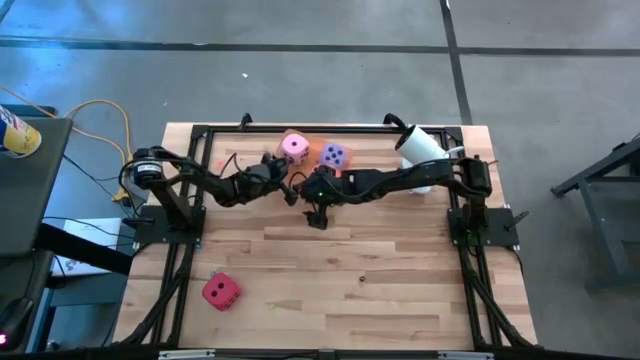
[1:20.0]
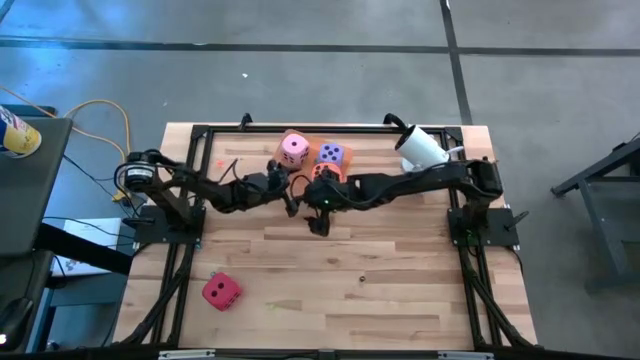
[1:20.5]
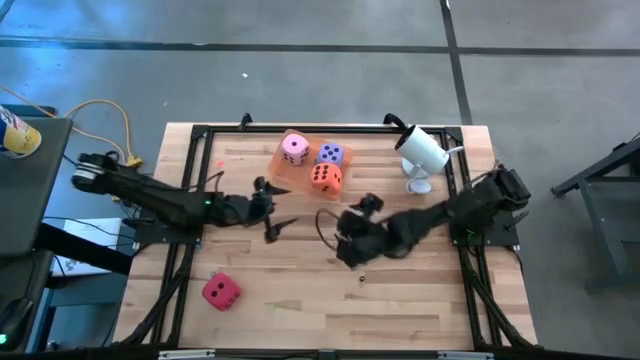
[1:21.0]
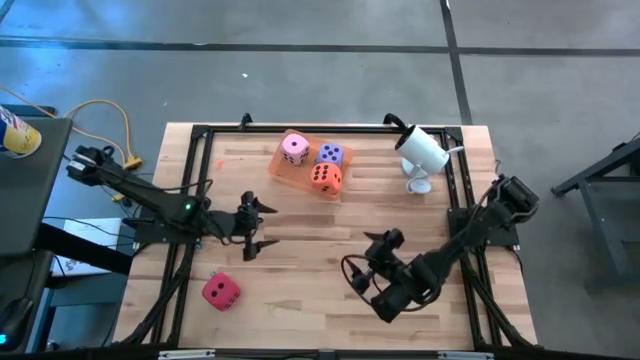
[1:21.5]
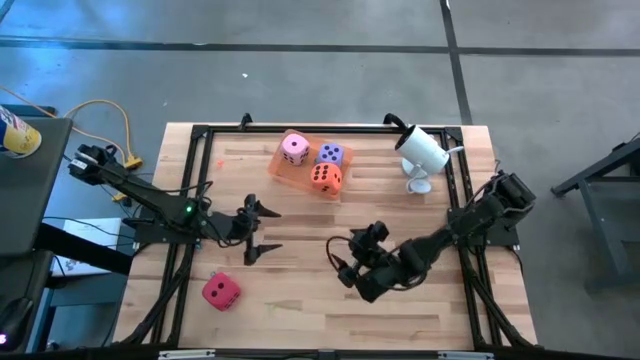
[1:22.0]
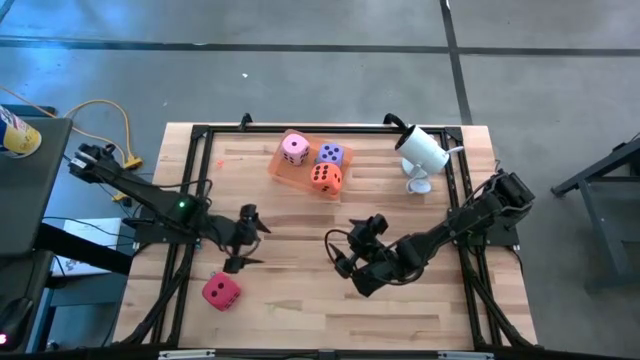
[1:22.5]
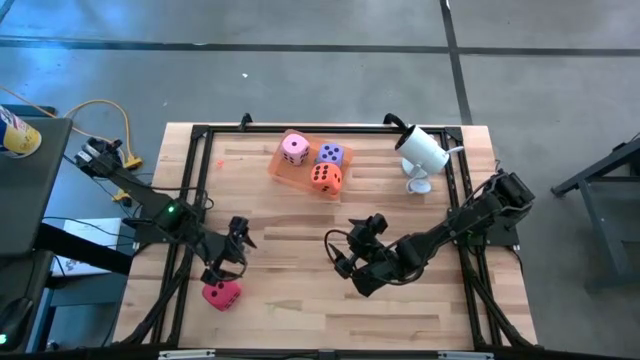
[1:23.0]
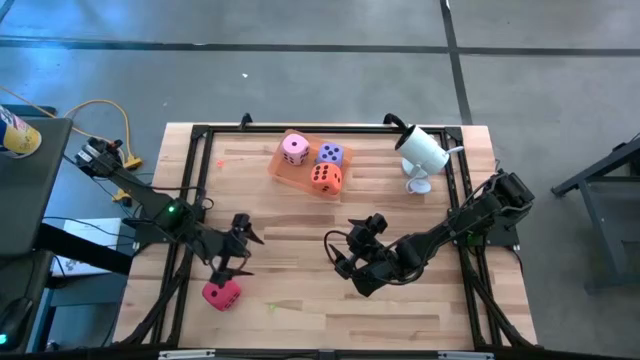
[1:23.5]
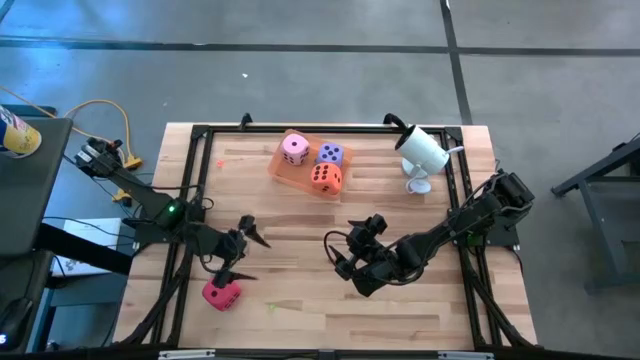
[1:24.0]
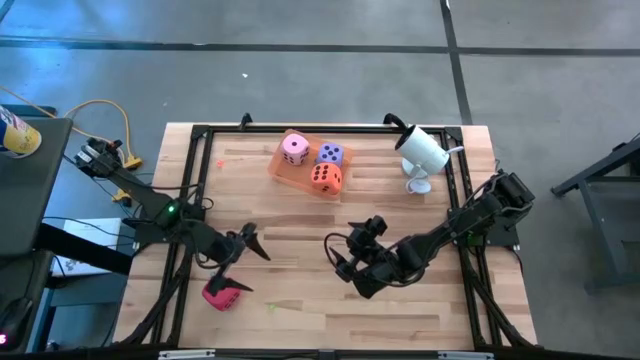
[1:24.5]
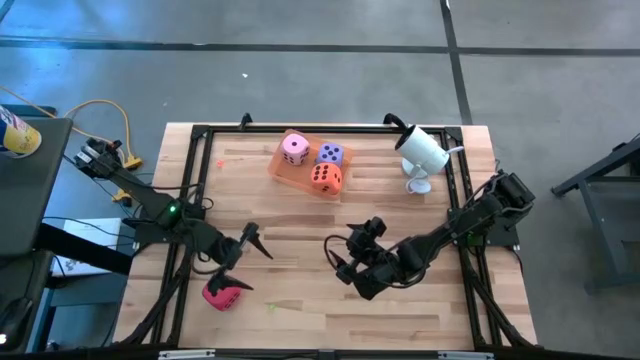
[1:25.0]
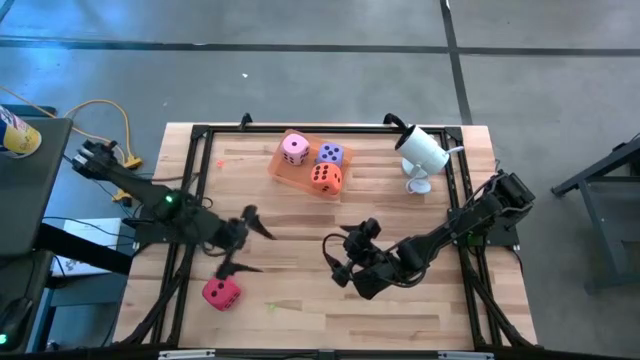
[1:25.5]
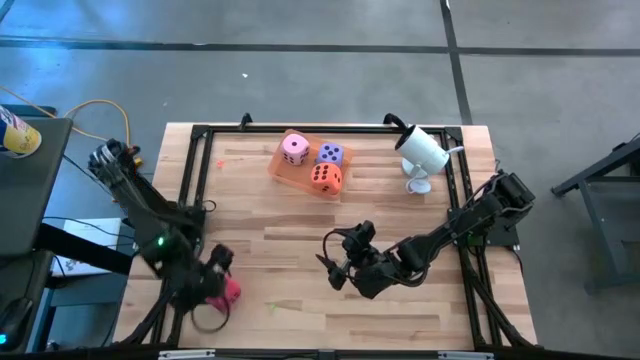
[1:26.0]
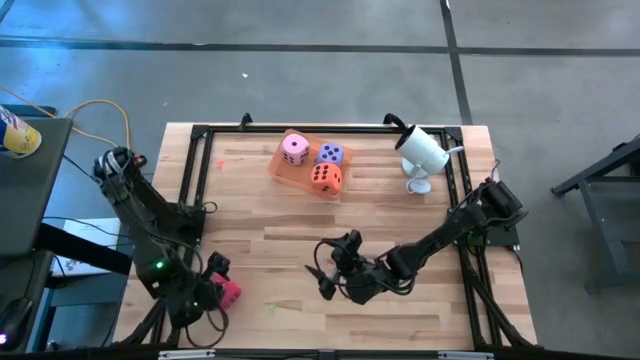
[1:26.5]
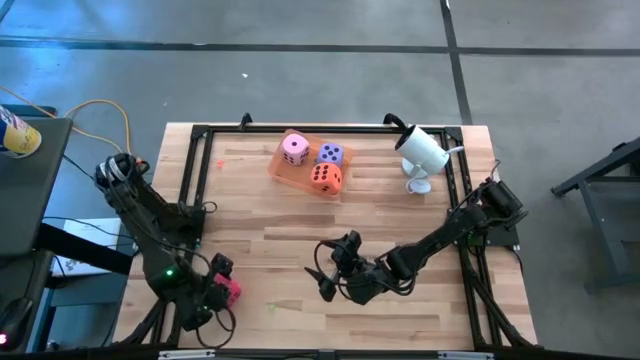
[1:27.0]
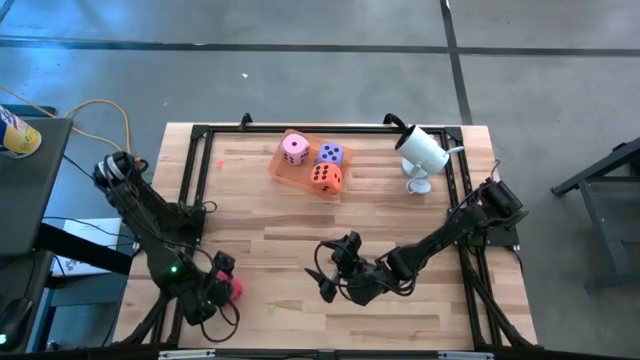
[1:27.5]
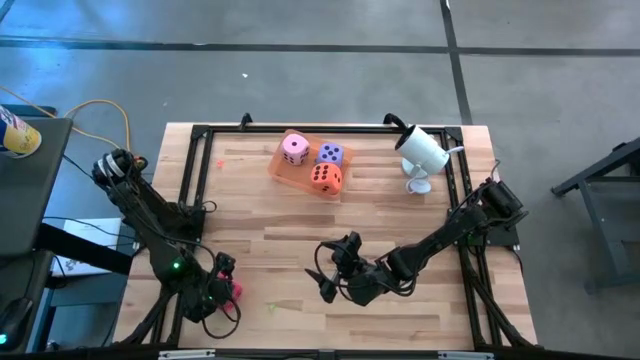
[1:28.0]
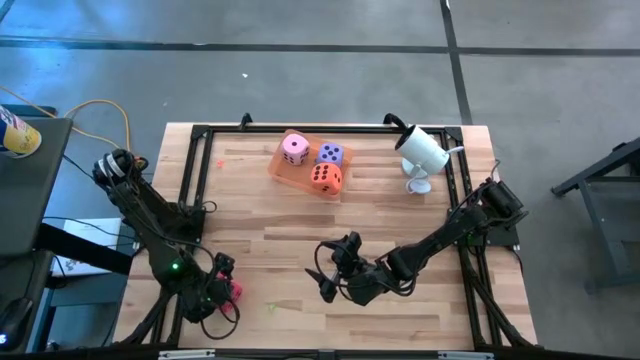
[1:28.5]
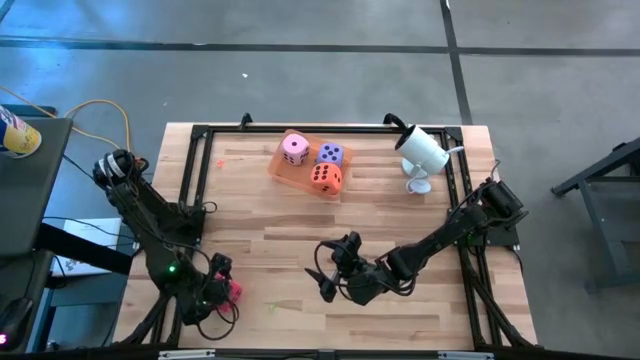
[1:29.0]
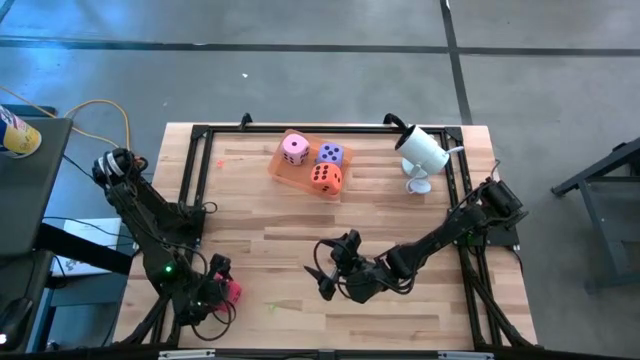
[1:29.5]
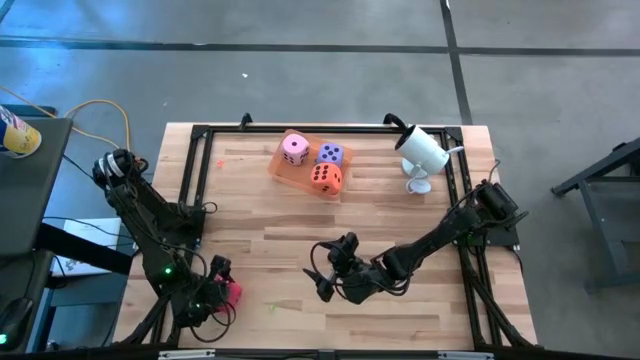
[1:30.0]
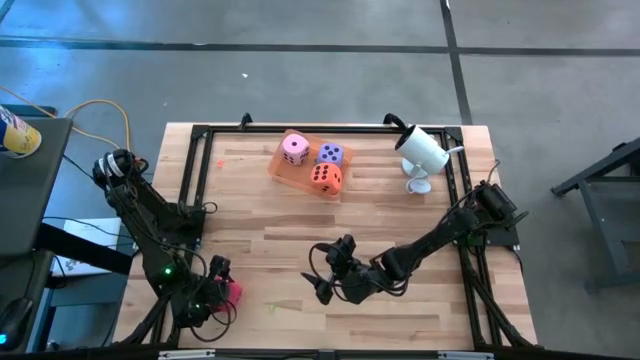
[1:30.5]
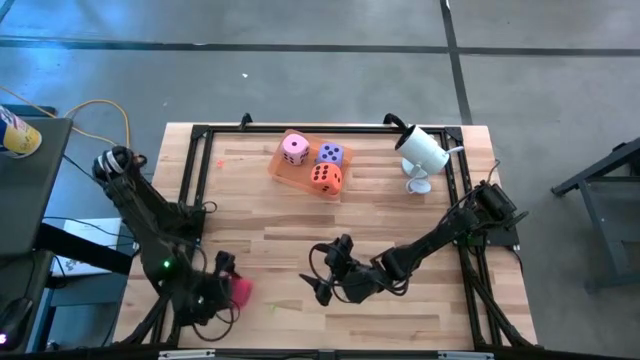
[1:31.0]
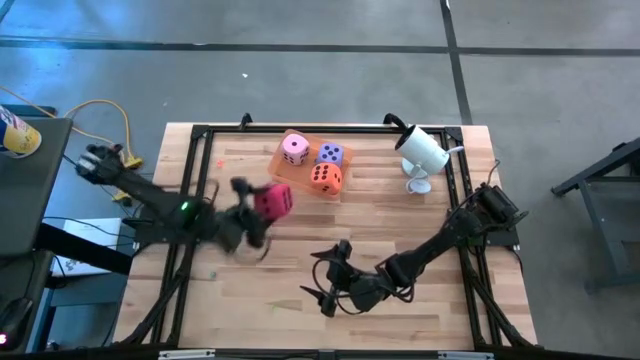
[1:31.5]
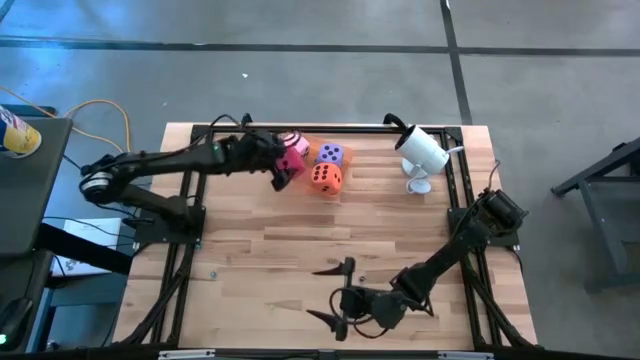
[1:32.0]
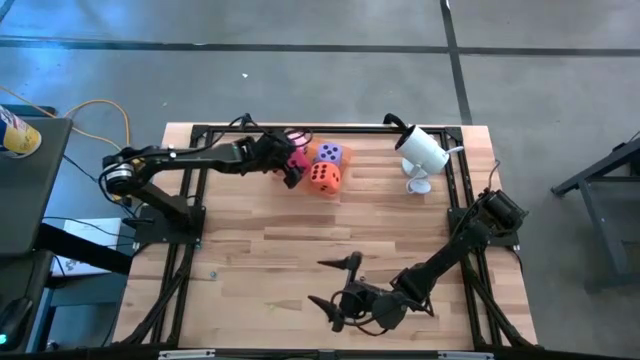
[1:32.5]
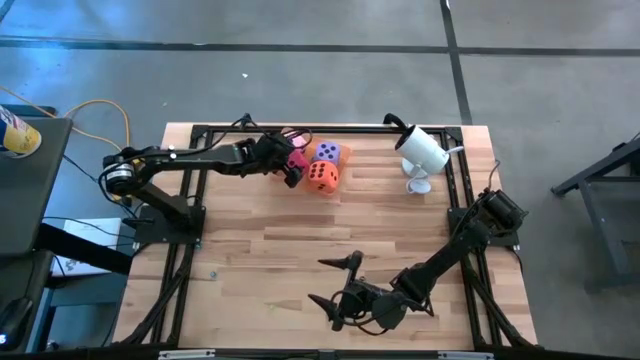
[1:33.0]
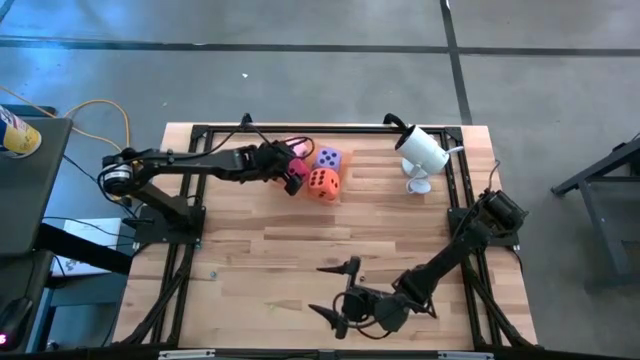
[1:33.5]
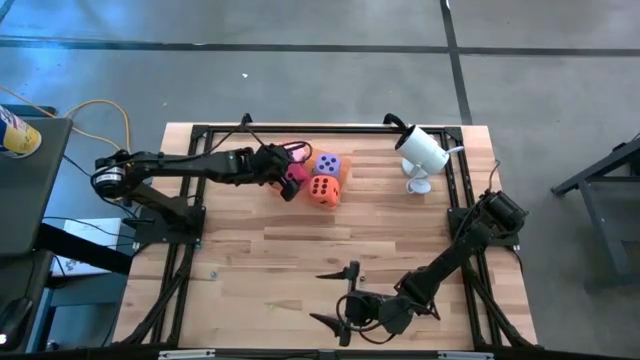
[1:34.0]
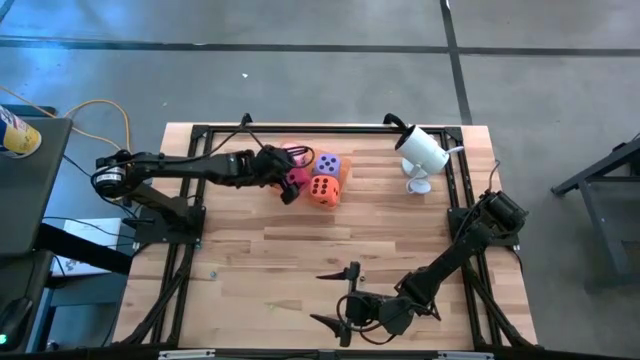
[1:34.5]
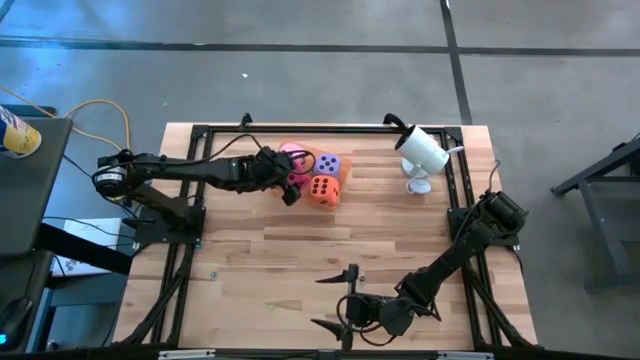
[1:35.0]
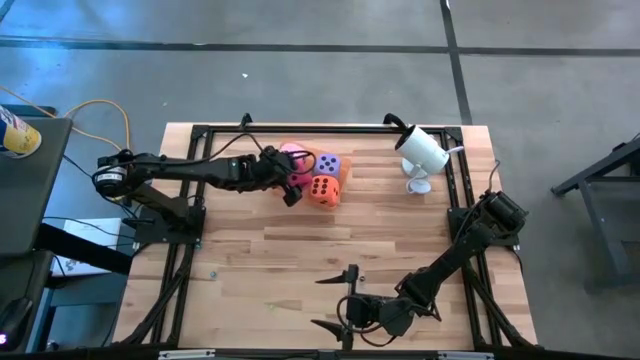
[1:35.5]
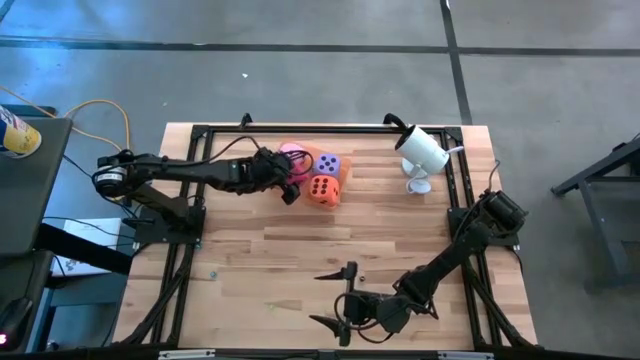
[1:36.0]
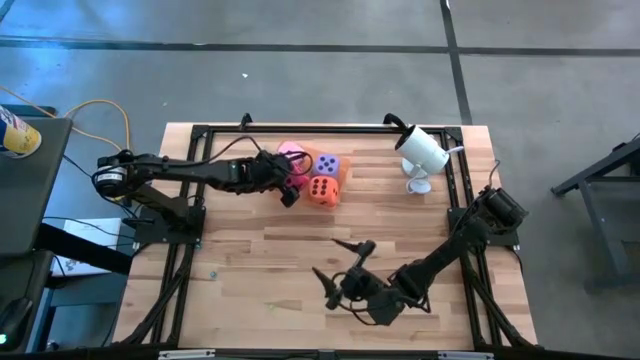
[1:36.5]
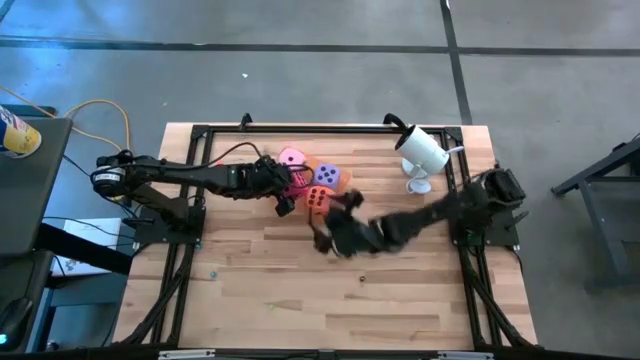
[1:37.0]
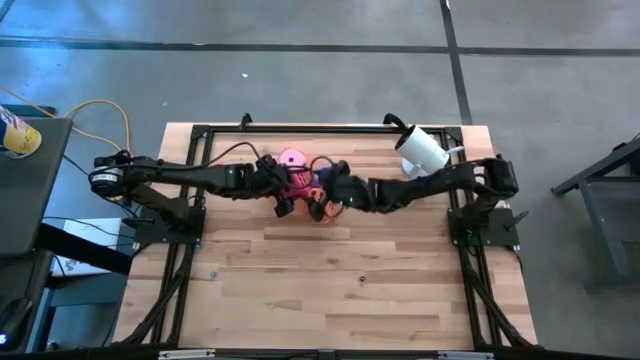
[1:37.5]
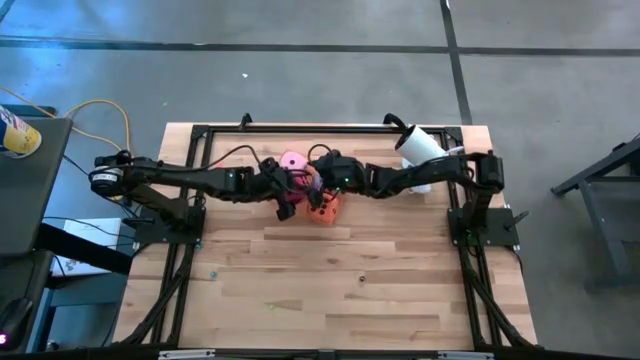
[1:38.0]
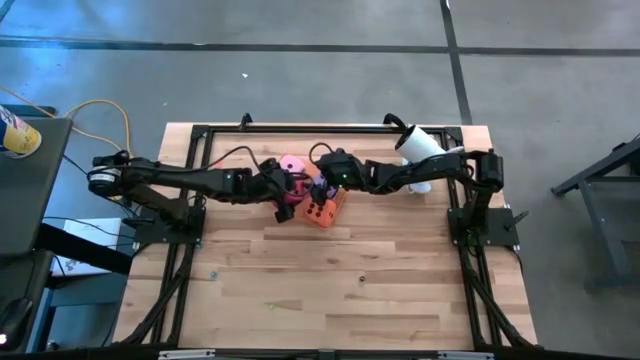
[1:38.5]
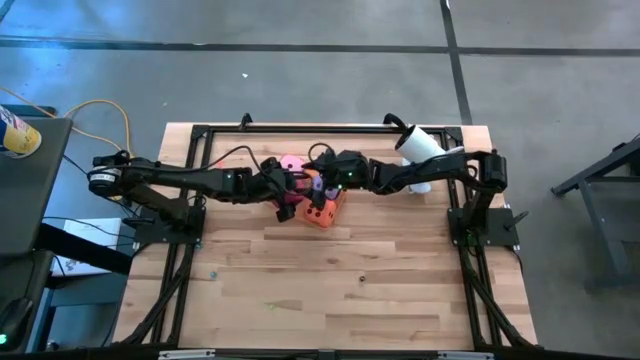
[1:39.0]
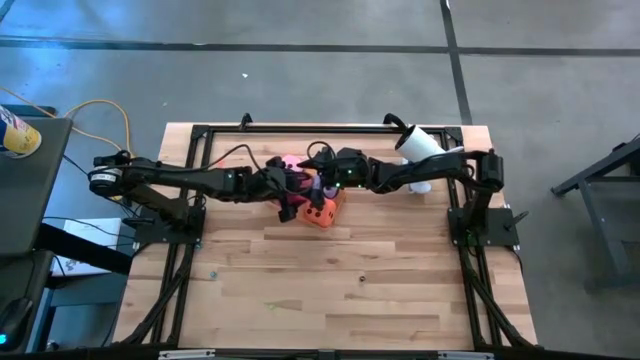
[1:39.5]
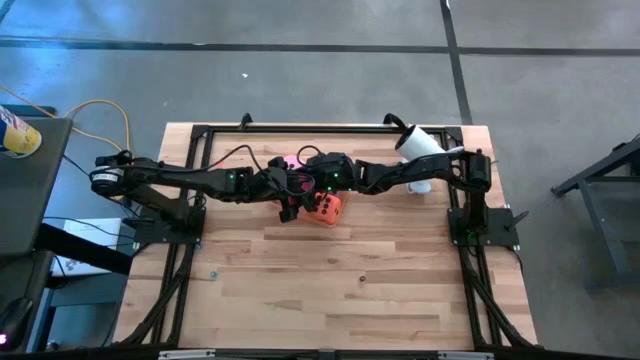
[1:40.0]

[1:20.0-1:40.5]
Task: Pick & Place Dice
Put the large red die into the orange bin

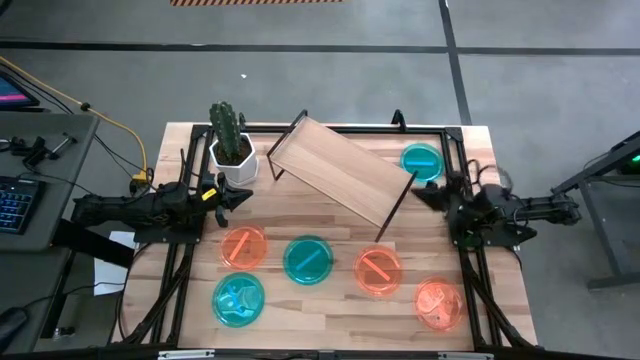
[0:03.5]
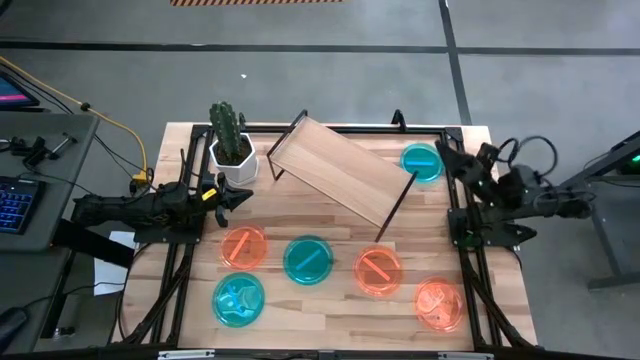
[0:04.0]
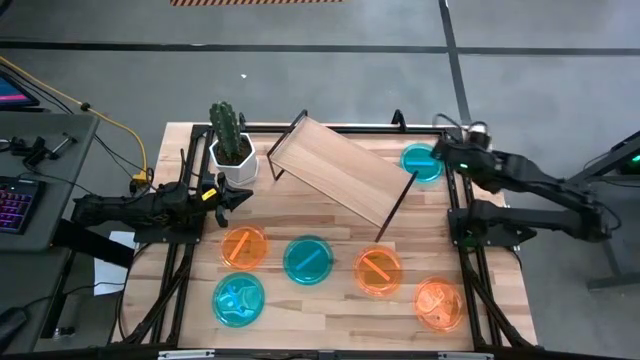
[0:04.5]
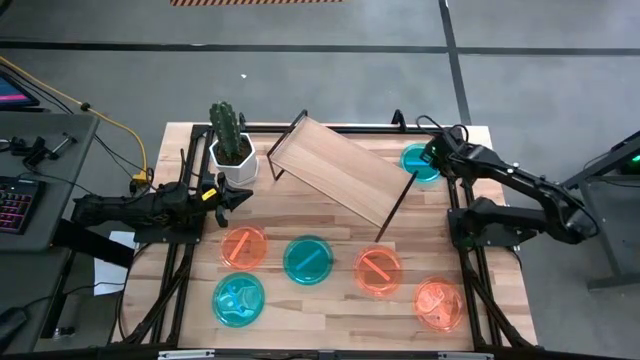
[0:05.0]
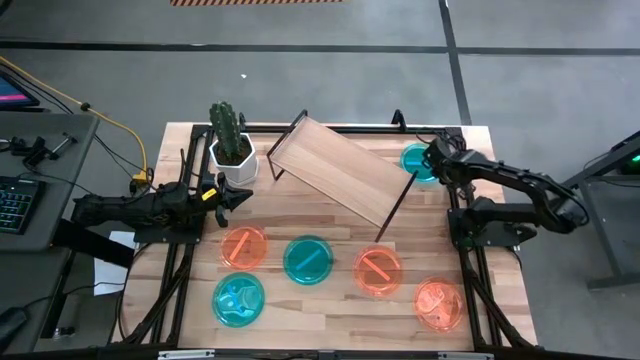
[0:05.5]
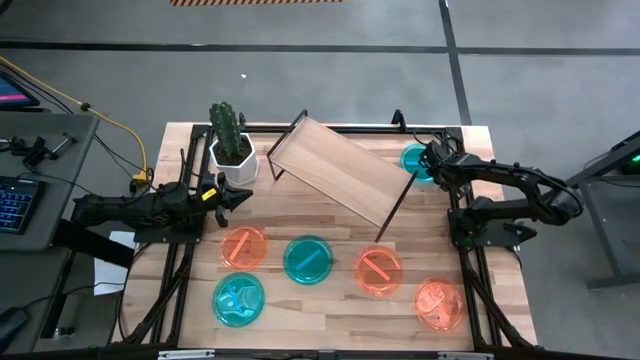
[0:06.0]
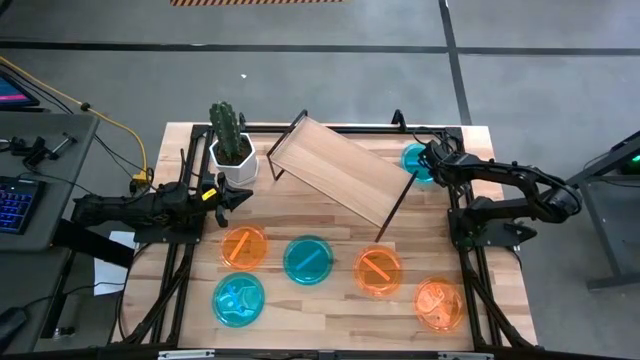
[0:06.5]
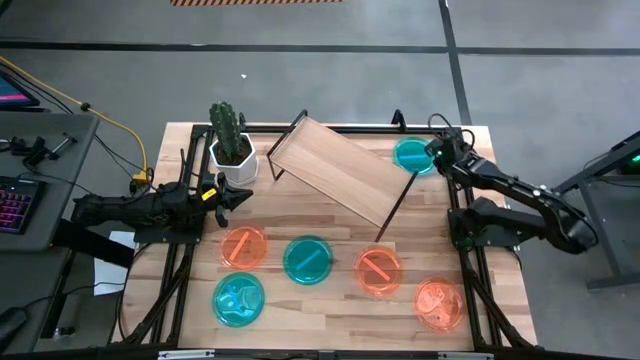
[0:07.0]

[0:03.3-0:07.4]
Task: Place and stack plates onto a shelf
Put the top right blue plate on the shelf
